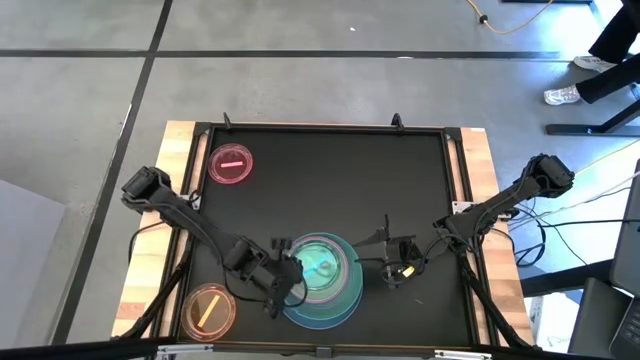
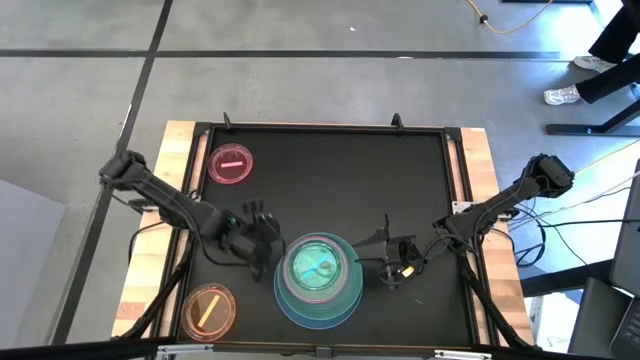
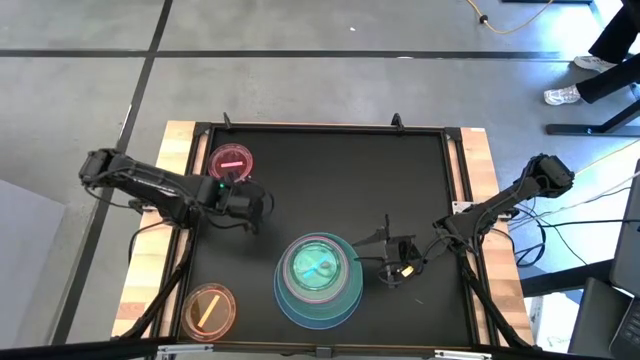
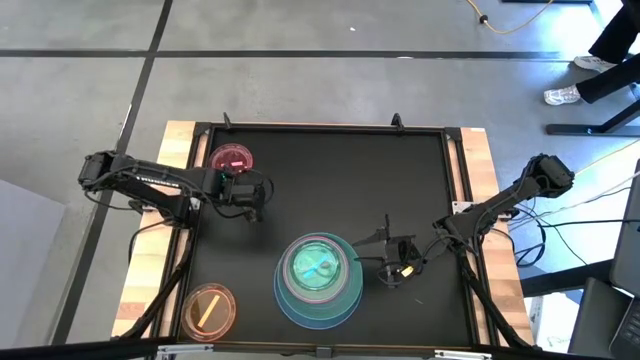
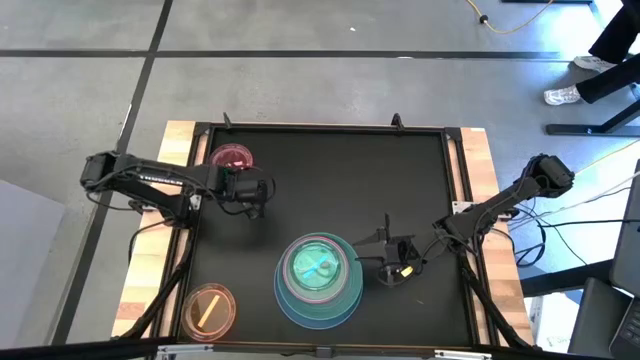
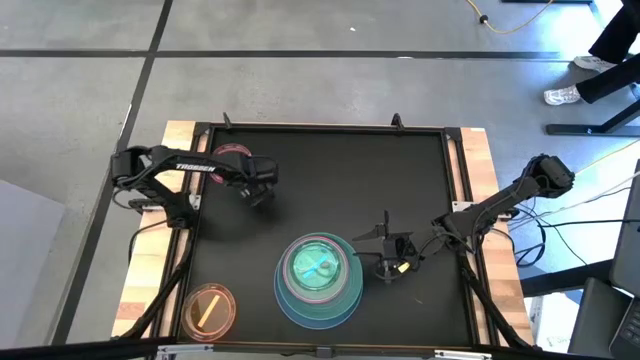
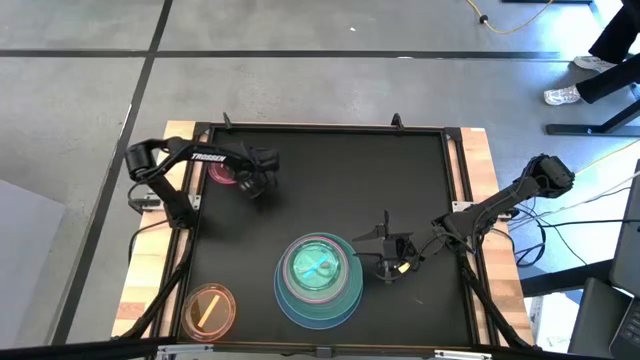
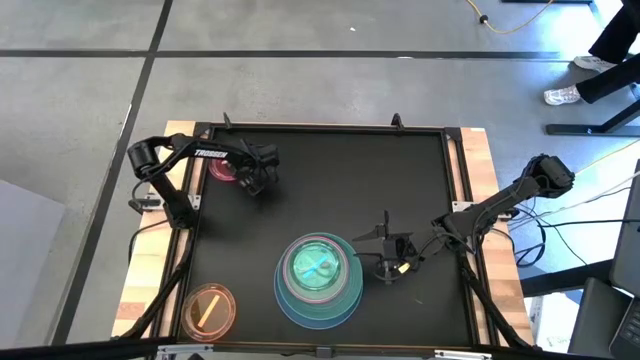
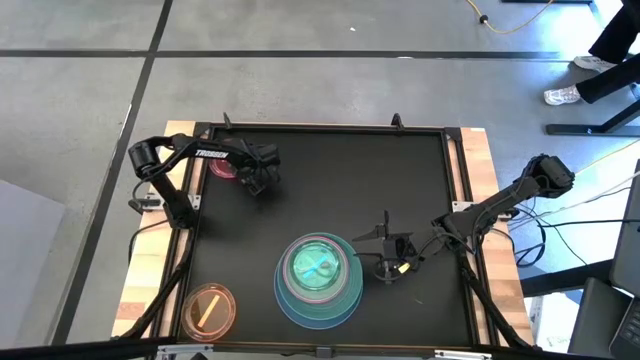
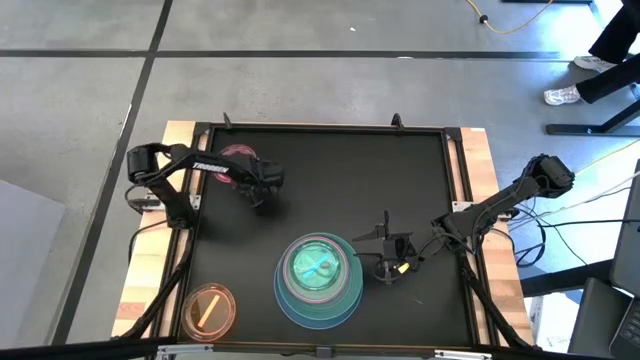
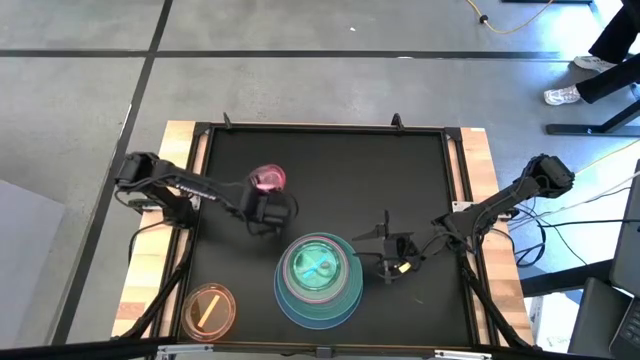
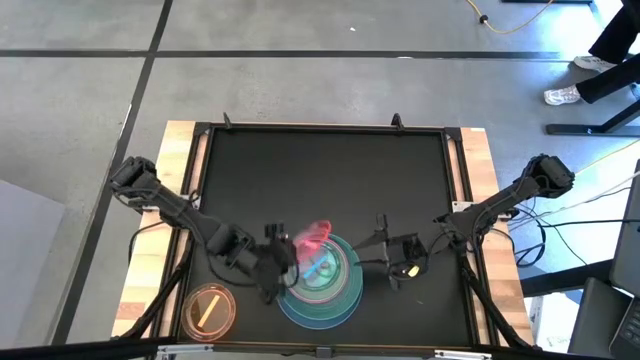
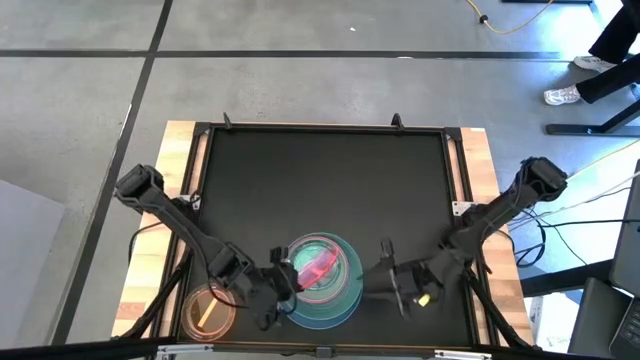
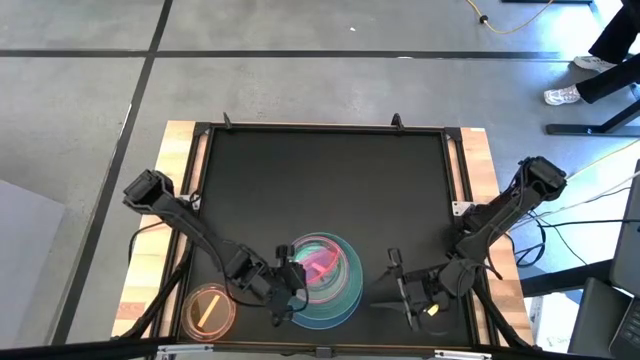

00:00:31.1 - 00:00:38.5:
Task: Stack plastic plates
Stack the red plate on top of the dark blue plate

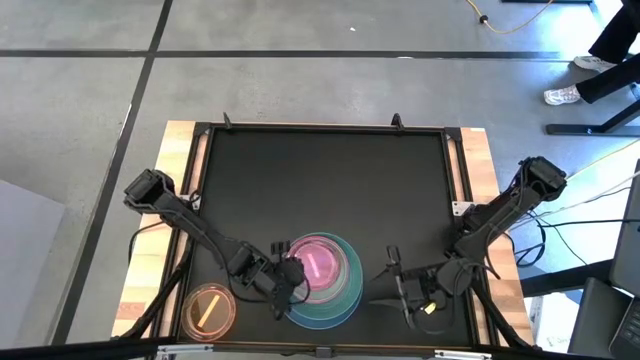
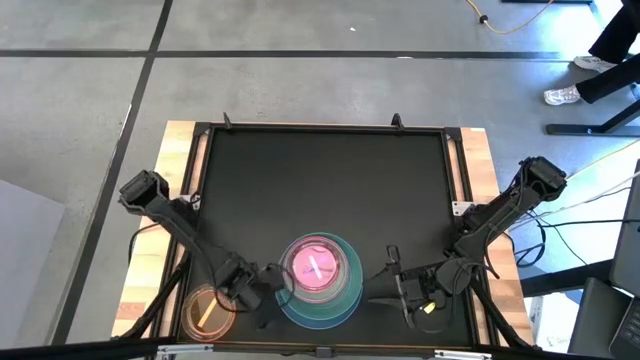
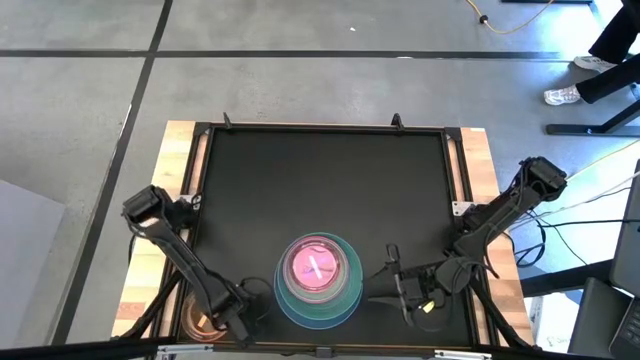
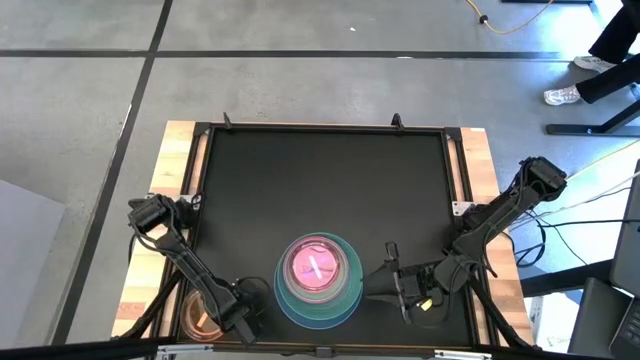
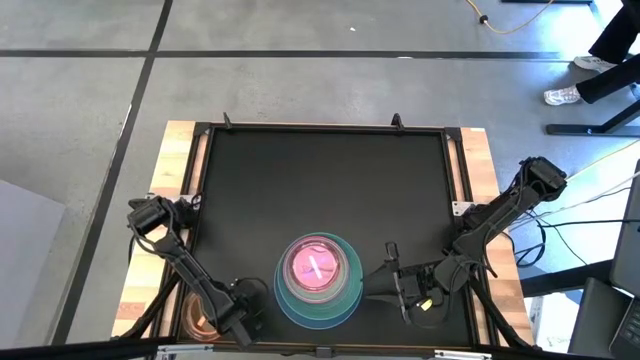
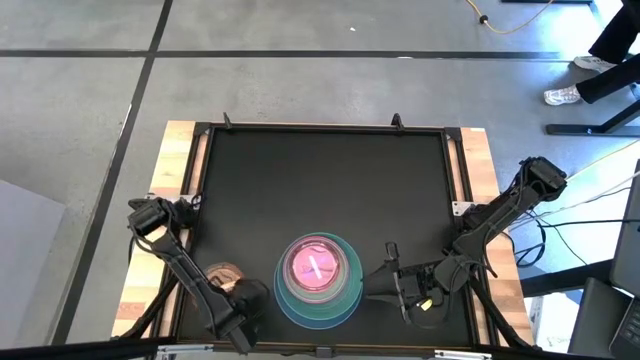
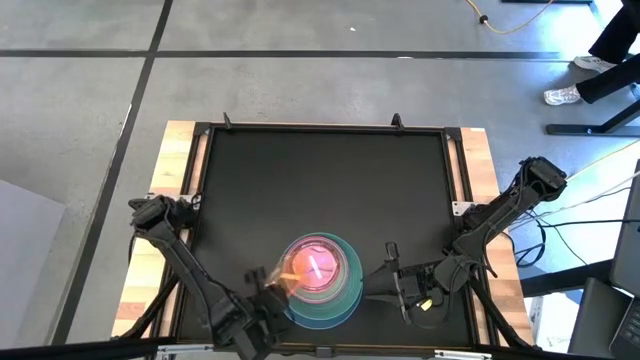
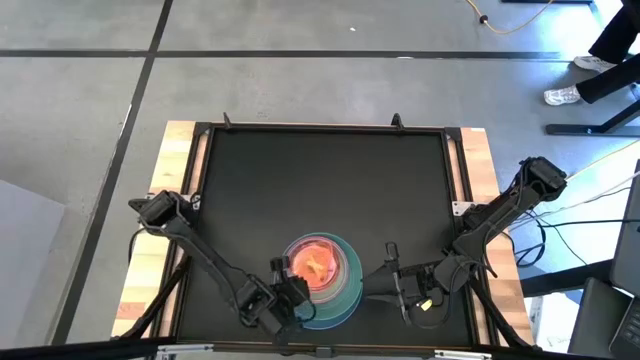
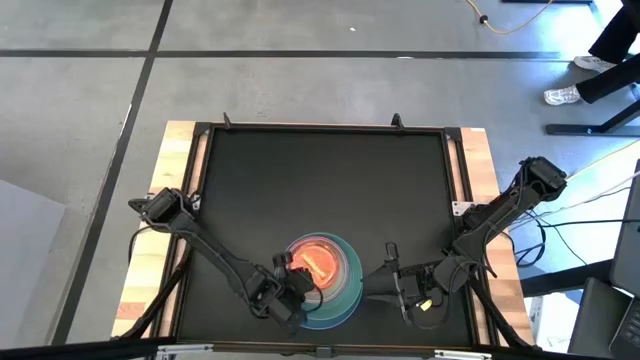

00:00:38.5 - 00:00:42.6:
Stack the orange plate on top of the red plate

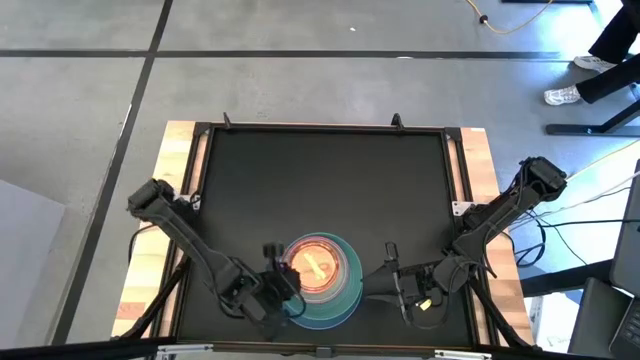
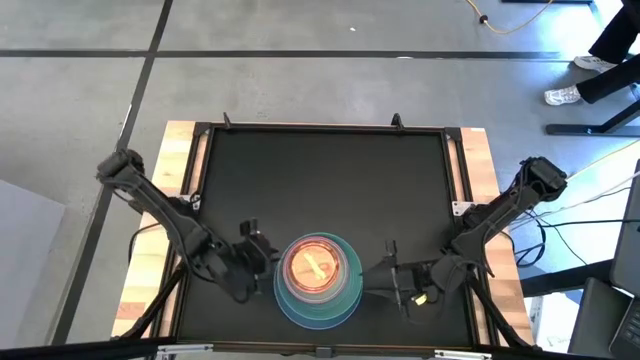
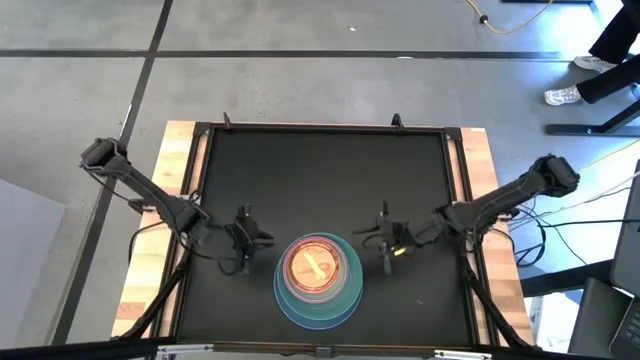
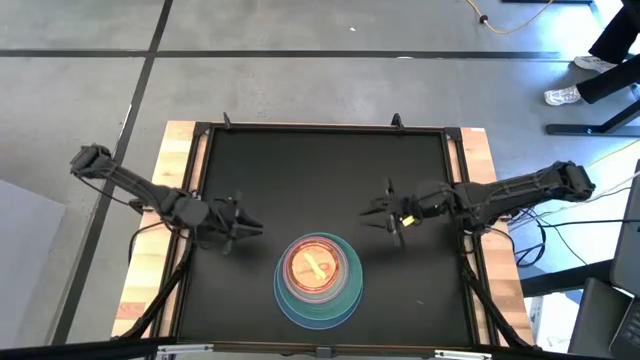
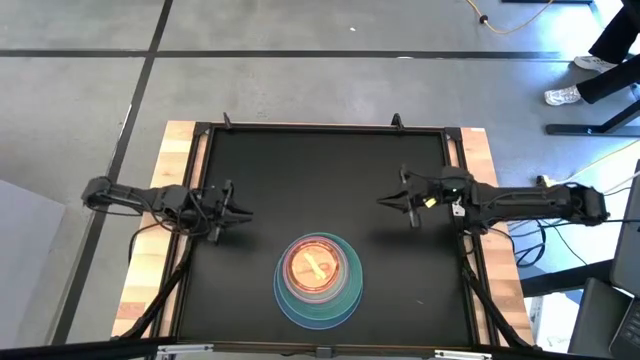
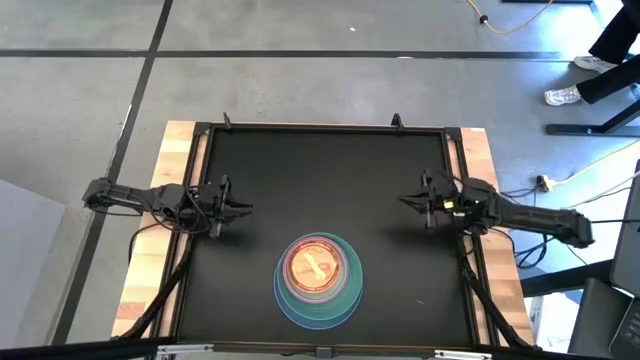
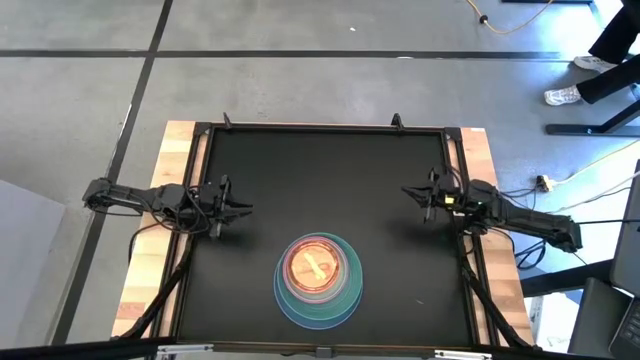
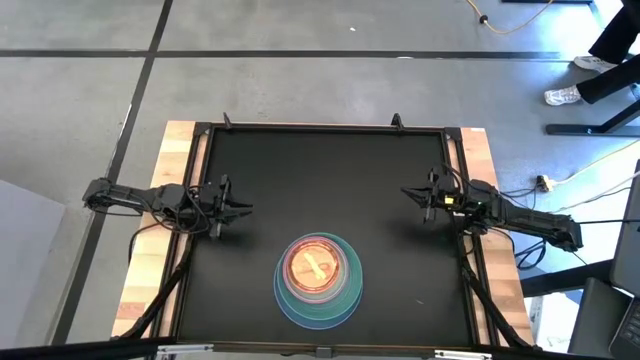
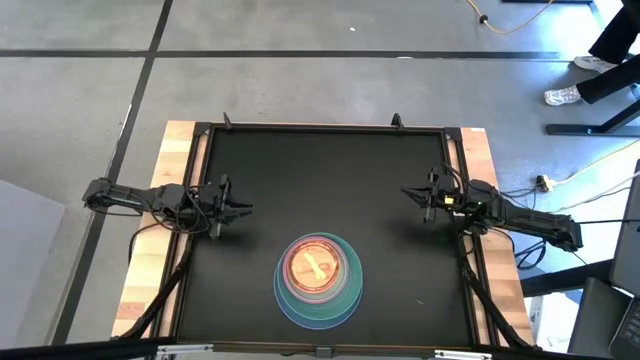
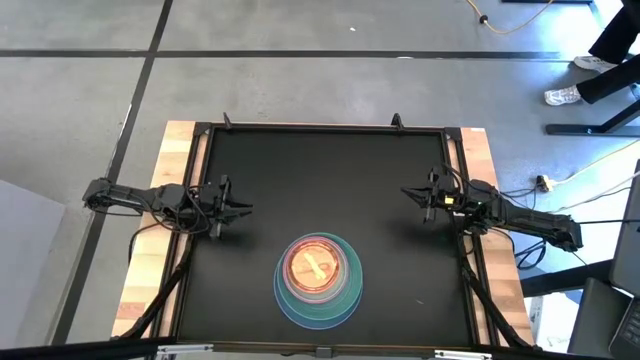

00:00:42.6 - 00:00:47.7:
Return to Home Position

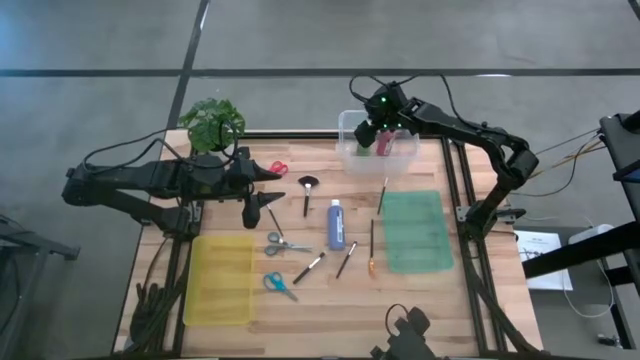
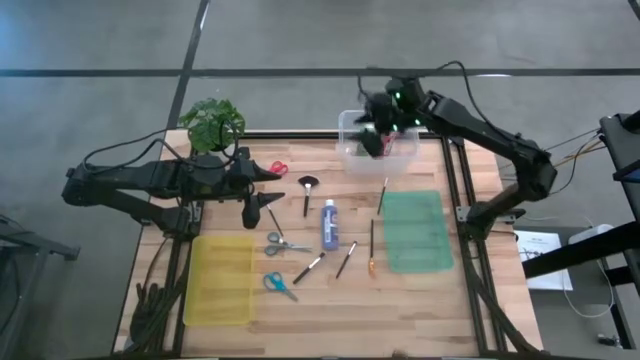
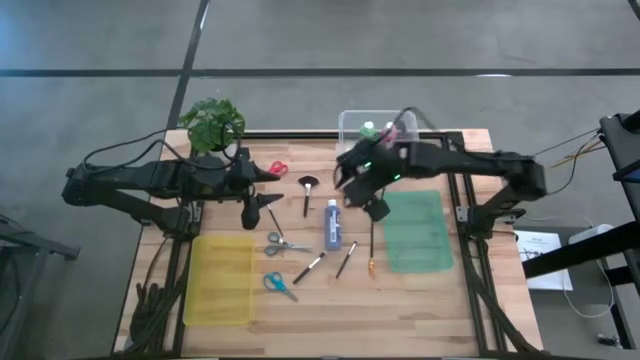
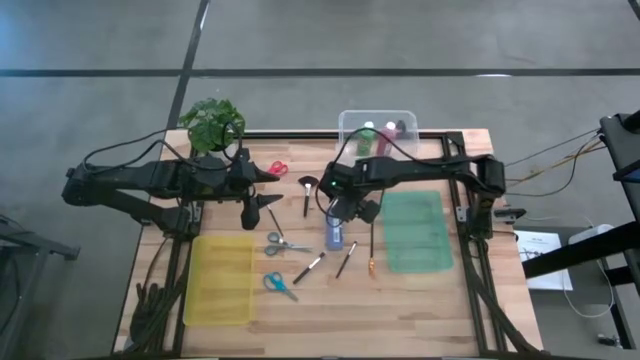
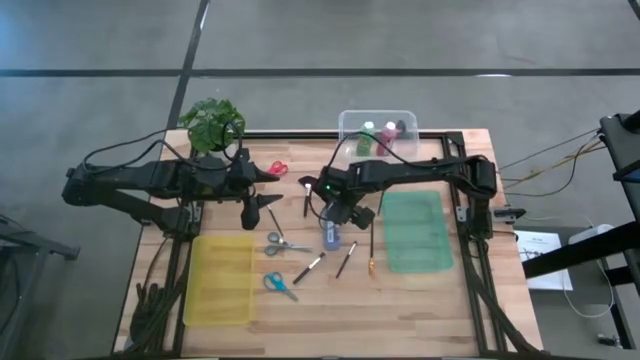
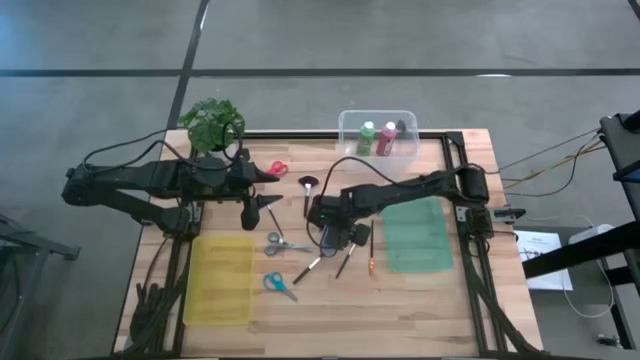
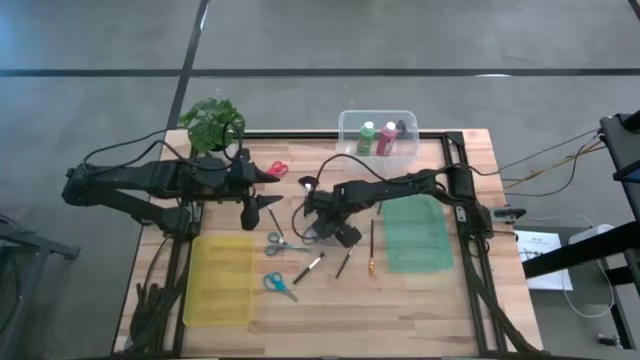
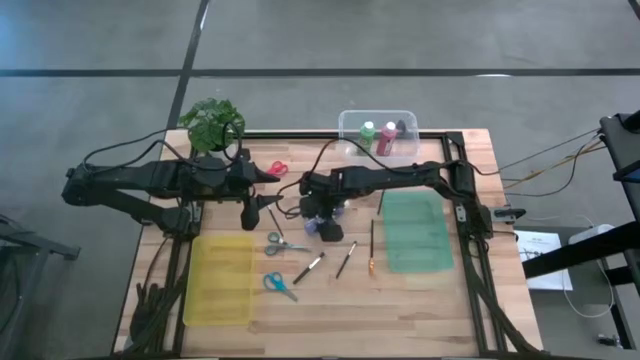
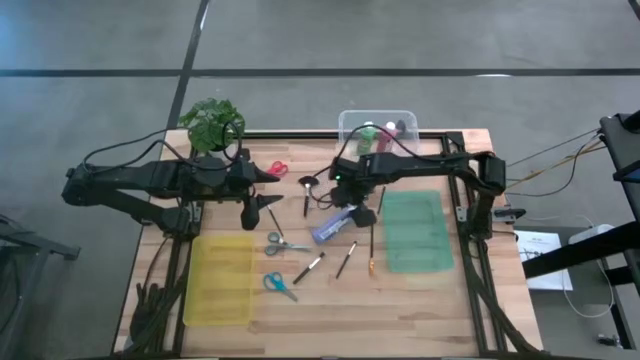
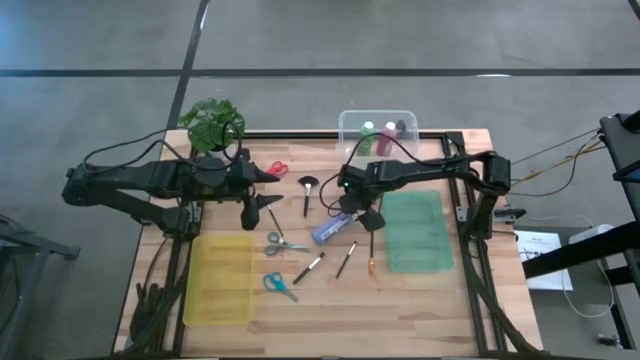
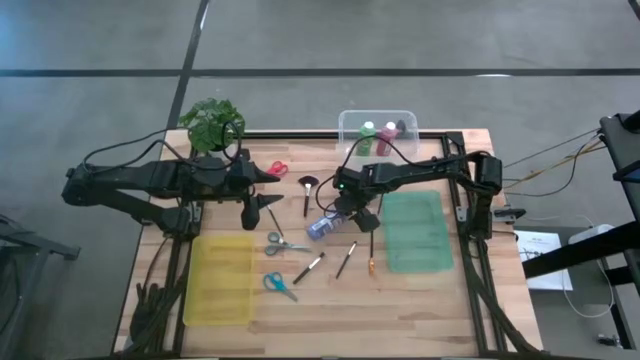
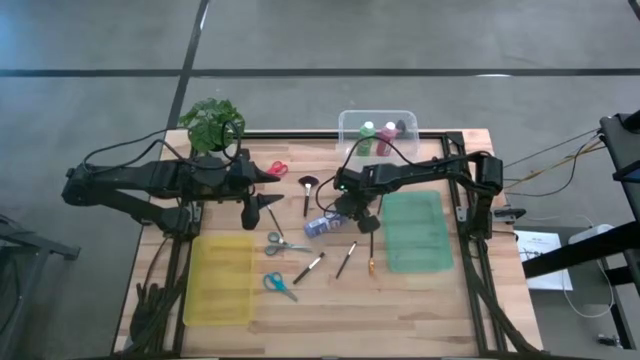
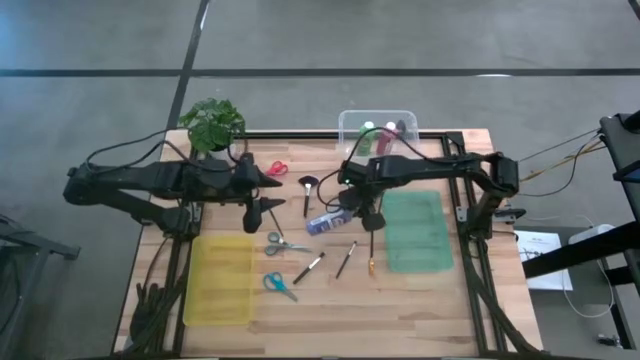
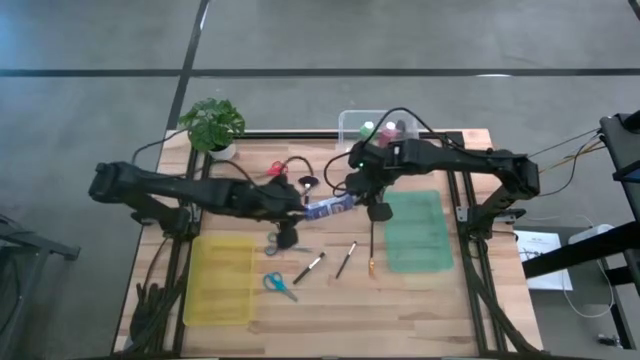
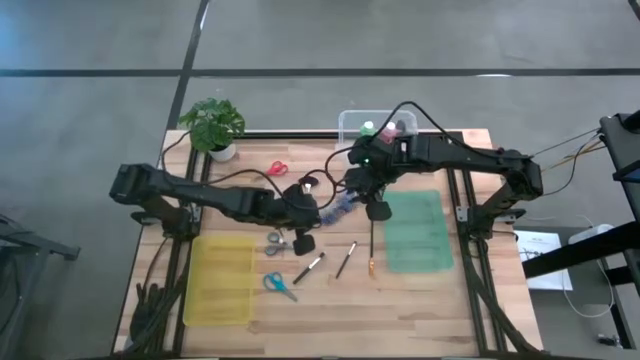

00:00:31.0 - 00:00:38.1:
Task: Pick & Place Paint Supplies
Put the blue paint bottle into the transparent bin
